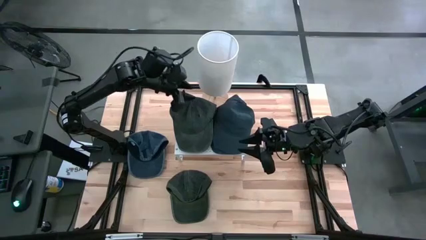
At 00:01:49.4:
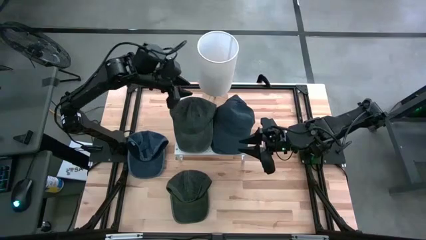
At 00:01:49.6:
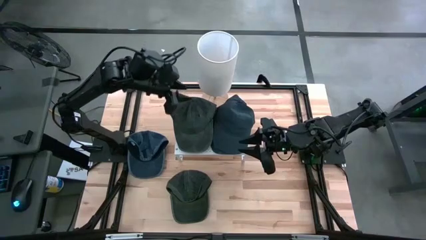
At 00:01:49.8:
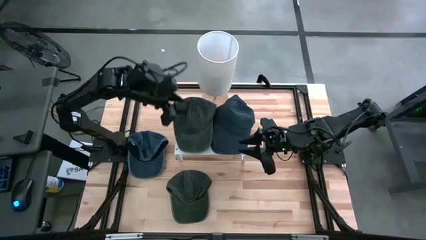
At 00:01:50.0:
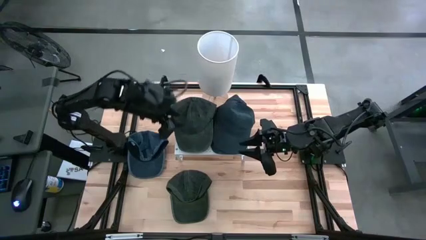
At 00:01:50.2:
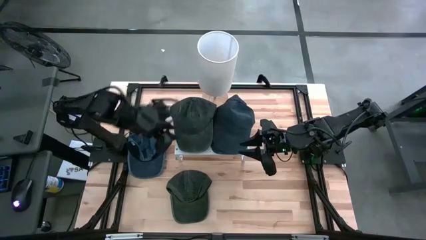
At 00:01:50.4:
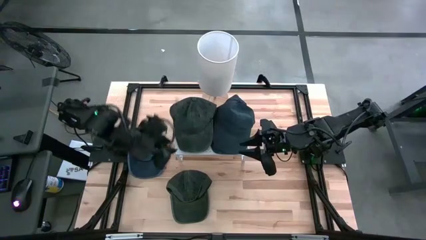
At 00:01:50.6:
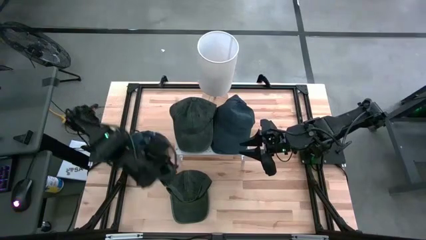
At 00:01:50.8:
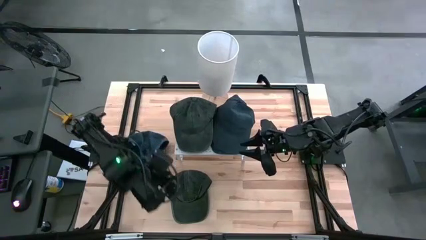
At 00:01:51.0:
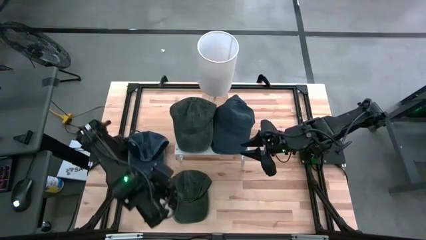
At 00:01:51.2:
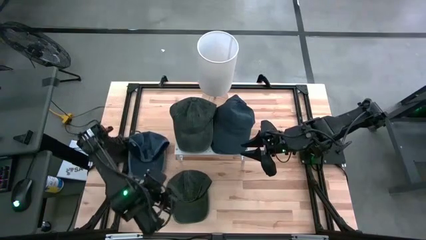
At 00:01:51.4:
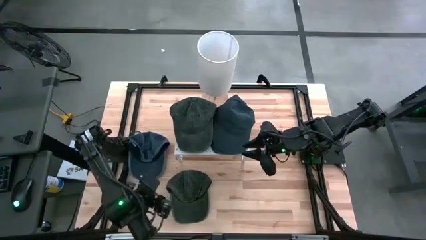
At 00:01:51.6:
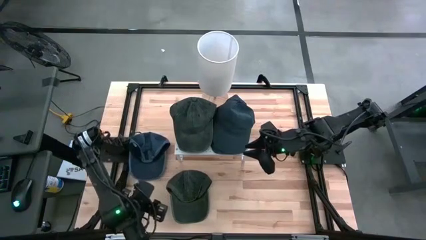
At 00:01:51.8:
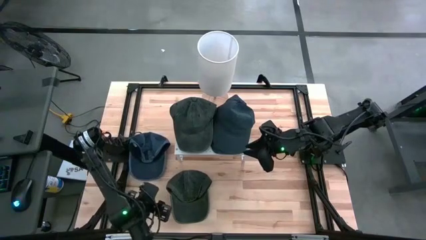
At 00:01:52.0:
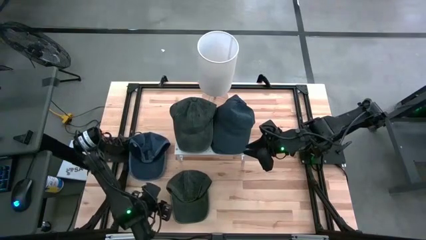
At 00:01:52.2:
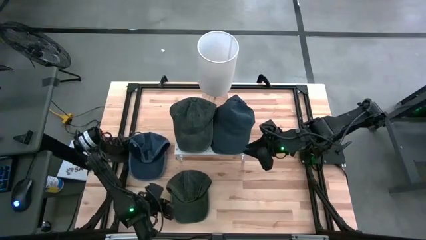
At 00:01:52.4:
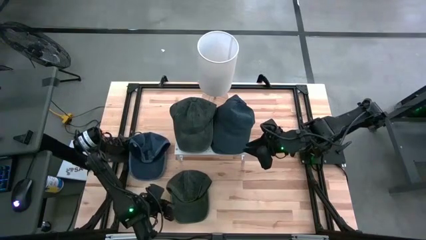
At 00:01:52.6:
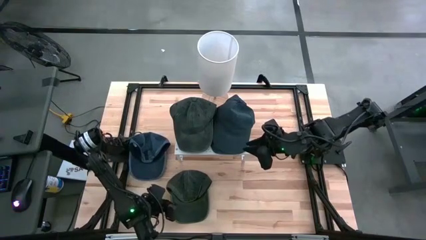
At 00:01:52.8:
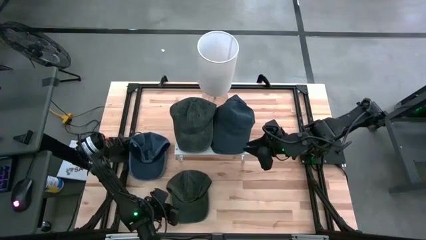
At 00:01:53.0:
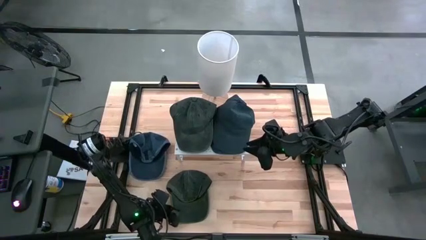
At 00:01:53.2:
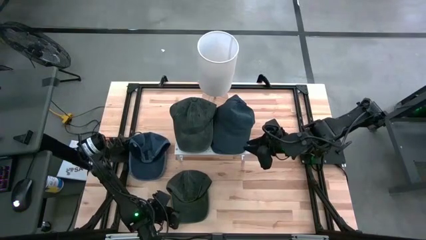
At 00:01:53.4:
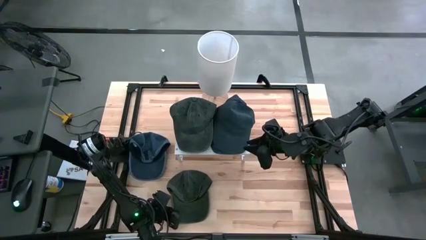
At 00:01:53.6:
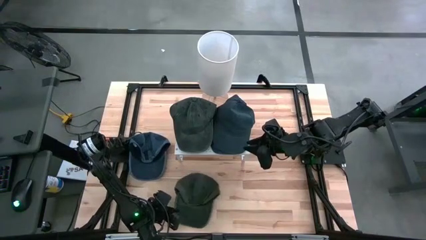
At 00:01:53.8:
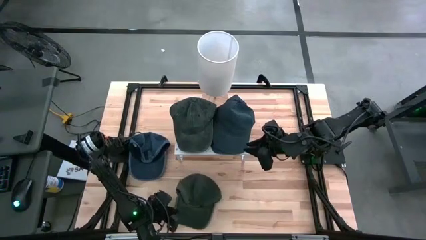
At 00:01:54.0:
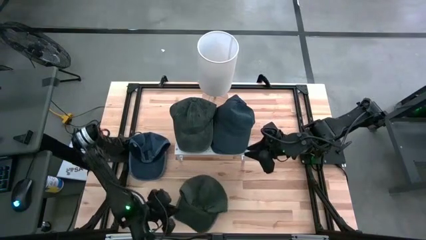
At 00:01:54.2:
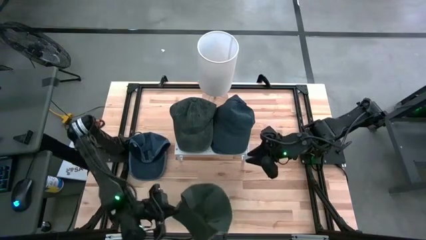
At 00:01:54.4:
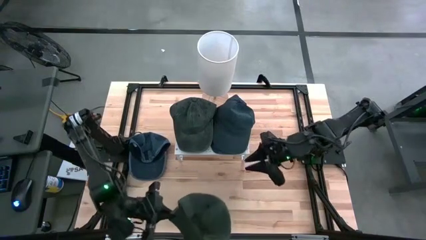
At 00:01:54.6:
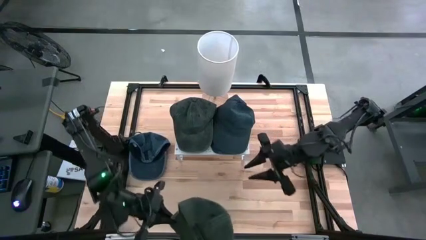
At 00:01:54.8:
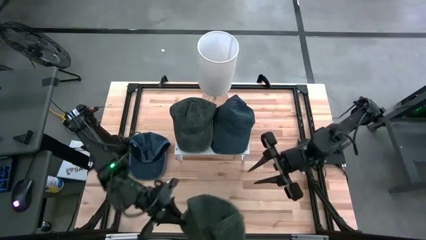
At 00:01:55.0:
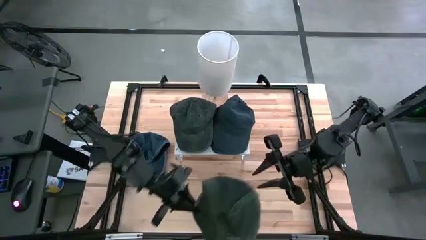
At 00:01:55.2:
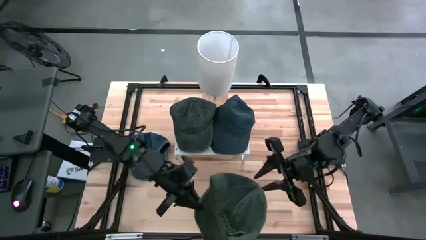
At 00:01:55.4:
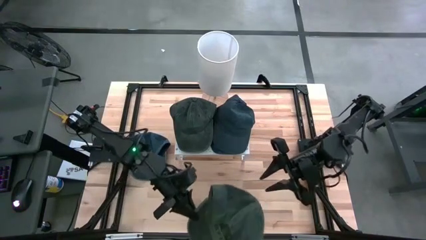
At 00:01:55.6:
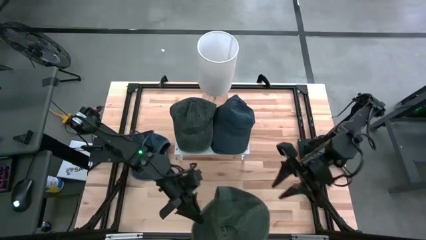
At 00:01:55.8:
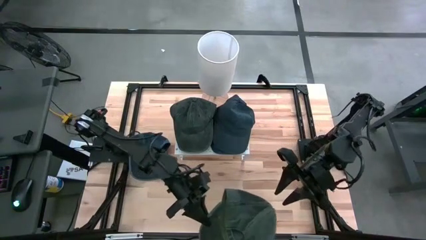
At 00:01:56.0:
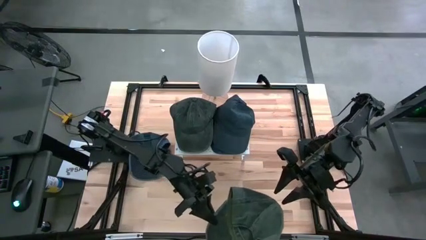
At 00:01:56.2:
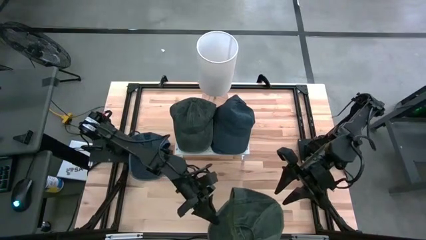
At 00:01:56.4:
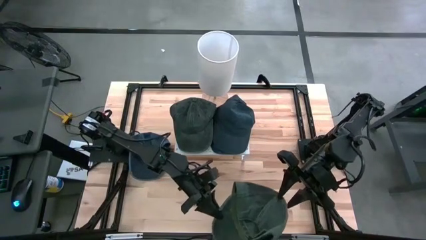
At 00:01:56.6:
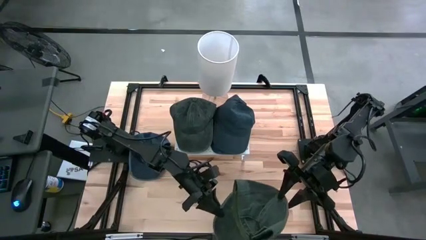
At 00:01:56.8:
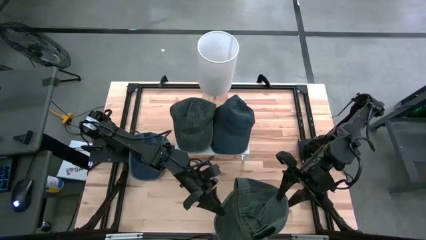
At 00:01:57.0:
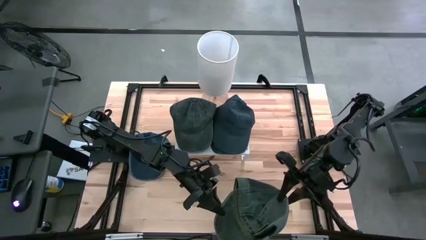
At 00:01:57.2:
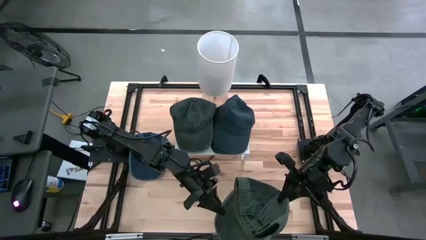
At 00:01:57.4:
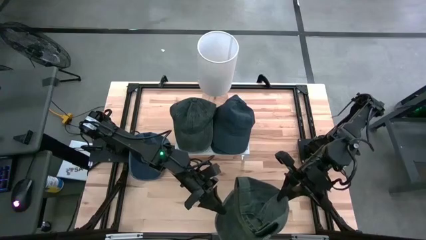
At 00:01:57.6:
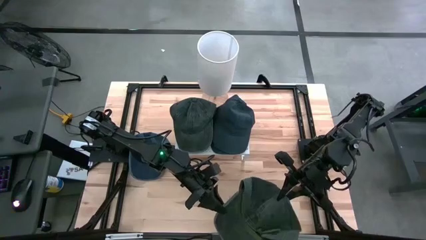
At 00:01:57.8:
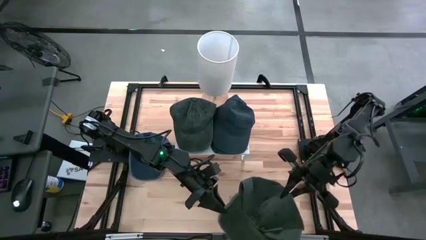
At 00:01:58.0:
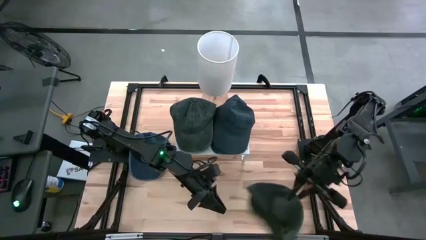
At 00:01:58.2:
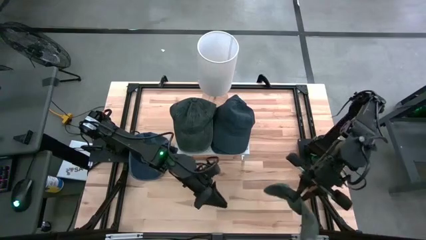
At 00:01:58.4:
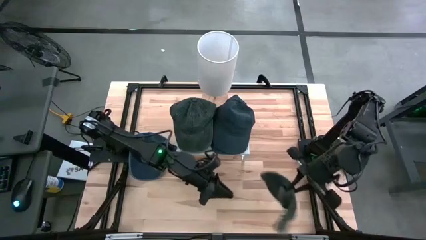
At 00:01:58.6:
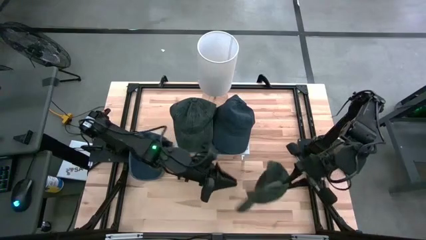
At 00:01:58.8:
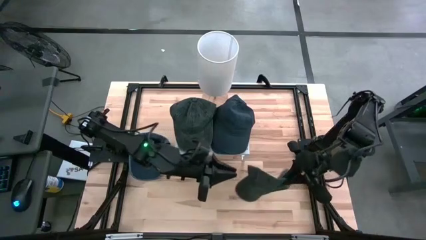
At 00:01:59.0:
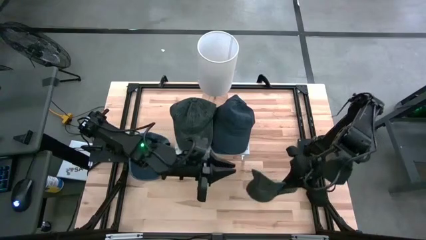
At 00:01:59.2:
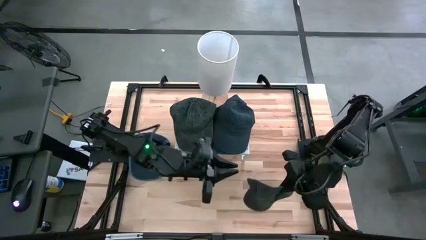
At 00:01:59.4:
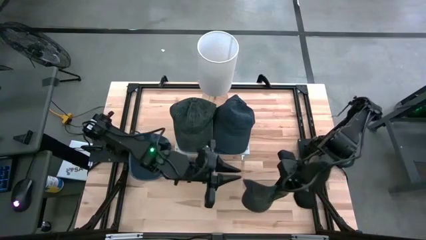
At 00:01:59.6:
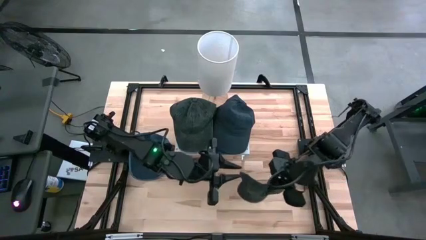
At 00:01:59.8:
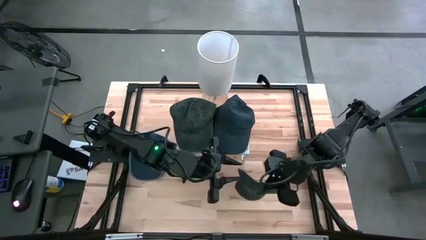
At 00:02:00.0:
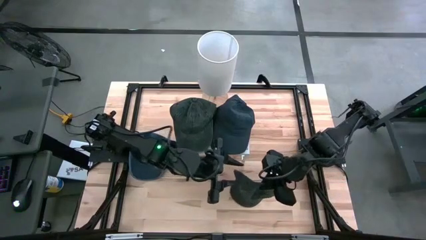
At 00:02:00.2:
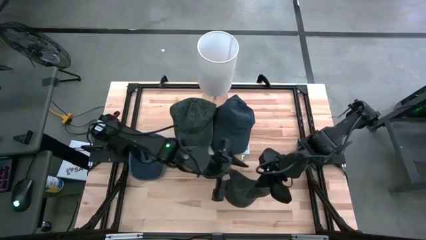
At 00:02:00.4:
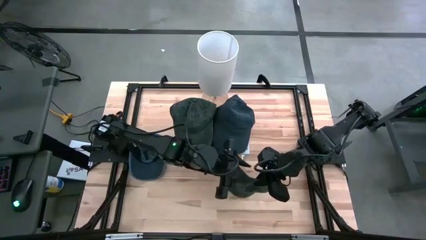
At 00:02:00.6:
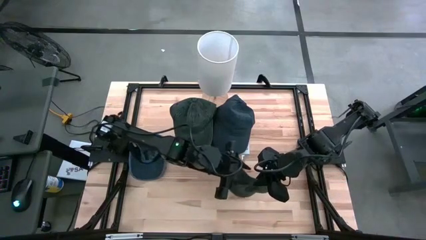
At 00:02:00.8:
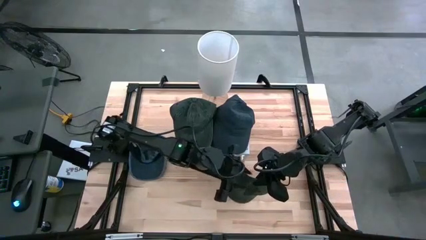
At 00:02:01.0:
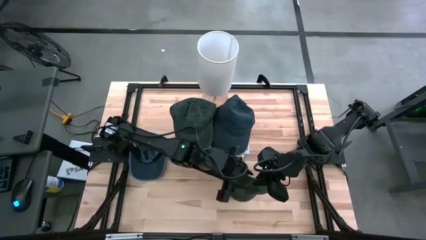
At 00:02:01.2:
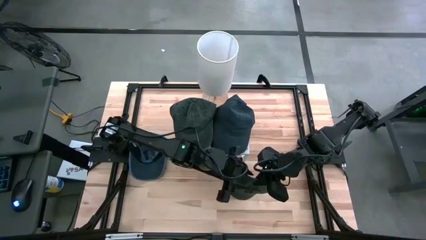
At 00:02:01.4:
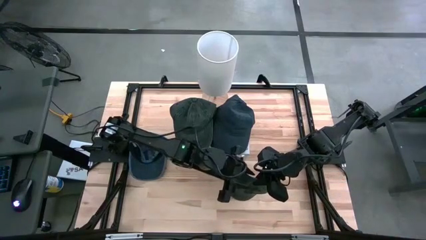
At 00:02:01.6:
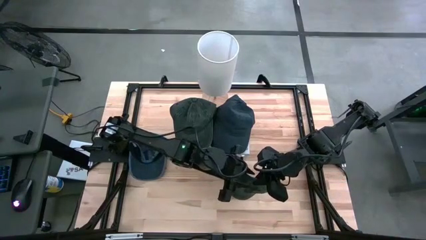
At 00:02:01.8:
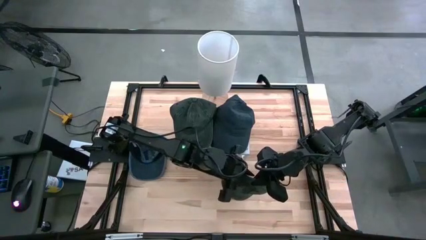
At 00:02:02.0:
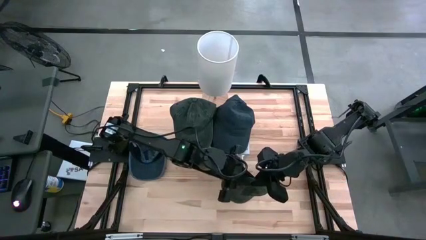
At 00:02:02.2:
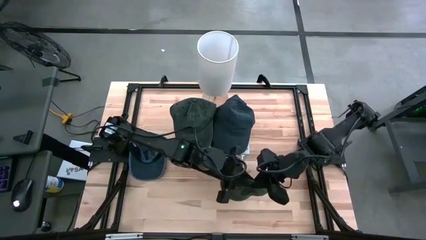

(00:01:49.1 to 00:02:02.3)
Task: Pick & Place hat
Stack the green cap on the green cap on the shelf
